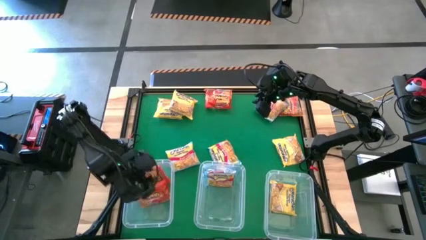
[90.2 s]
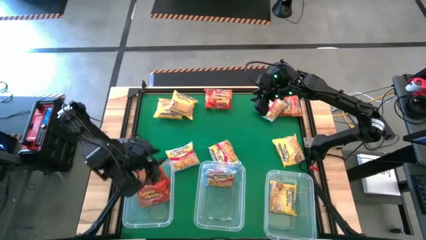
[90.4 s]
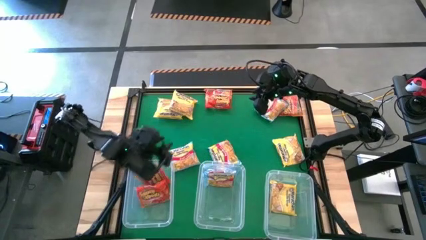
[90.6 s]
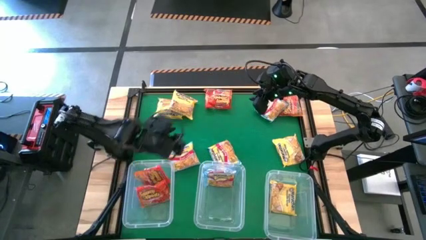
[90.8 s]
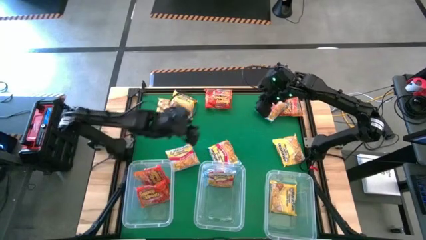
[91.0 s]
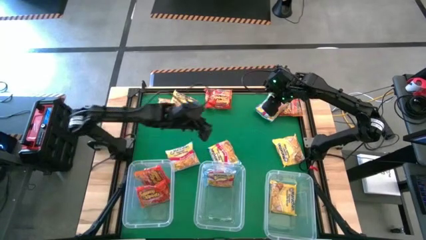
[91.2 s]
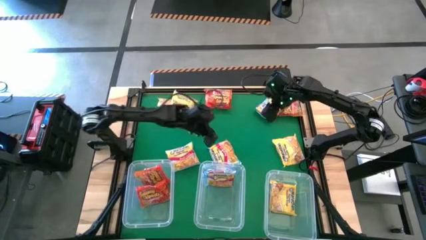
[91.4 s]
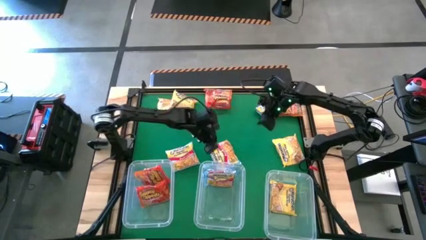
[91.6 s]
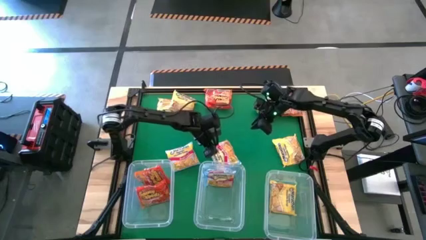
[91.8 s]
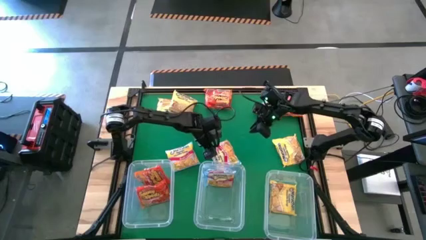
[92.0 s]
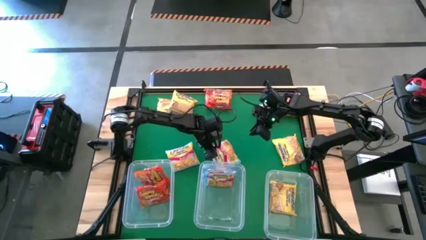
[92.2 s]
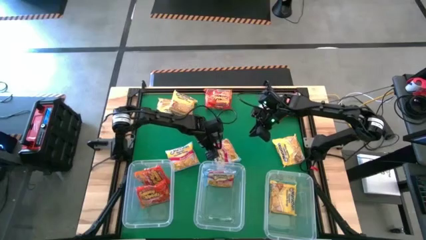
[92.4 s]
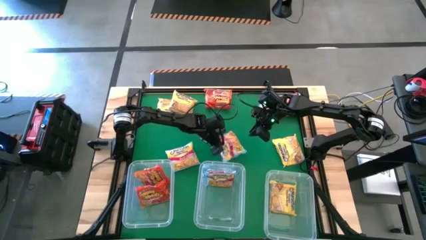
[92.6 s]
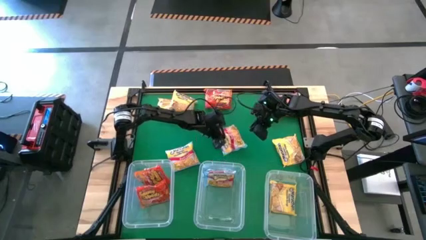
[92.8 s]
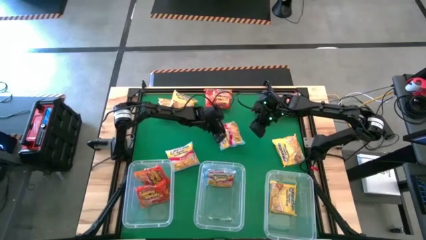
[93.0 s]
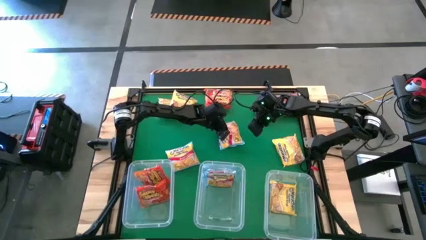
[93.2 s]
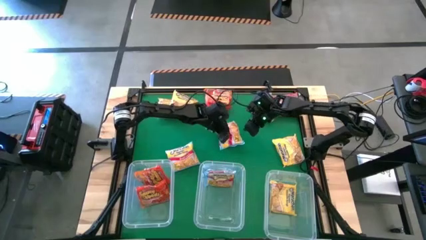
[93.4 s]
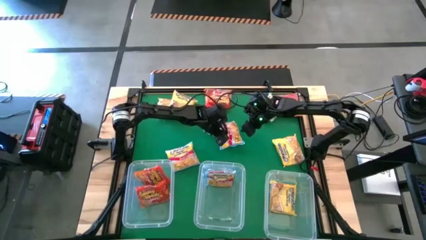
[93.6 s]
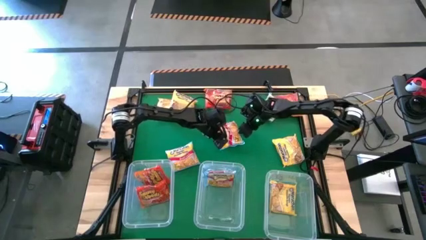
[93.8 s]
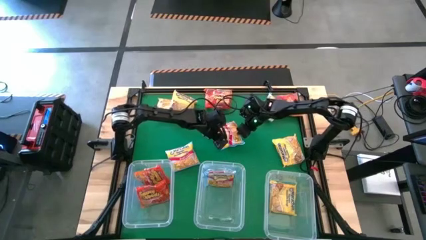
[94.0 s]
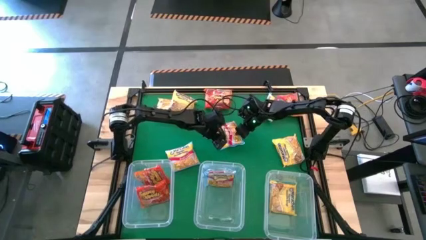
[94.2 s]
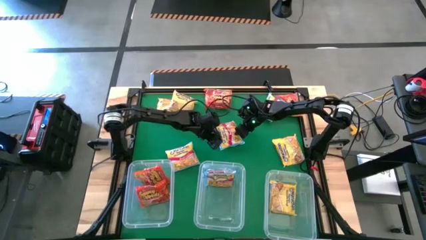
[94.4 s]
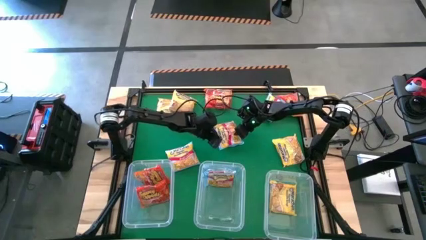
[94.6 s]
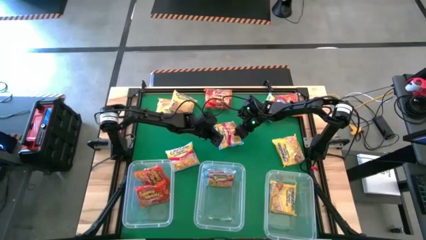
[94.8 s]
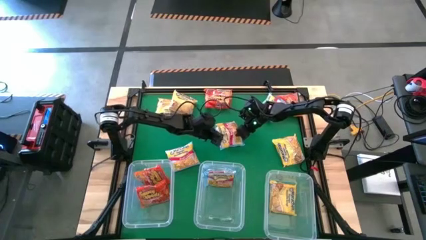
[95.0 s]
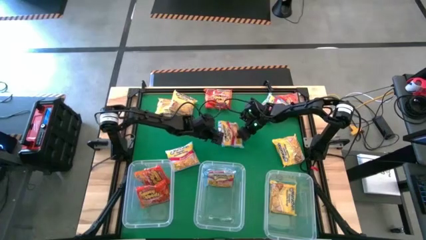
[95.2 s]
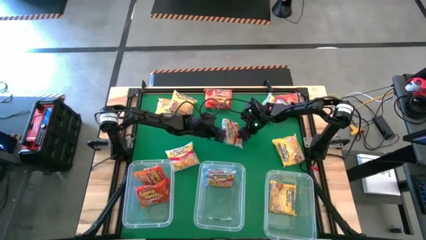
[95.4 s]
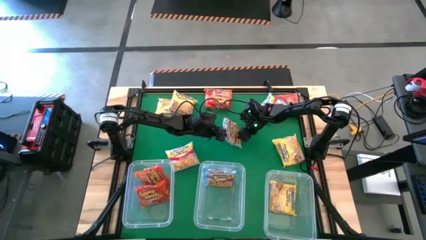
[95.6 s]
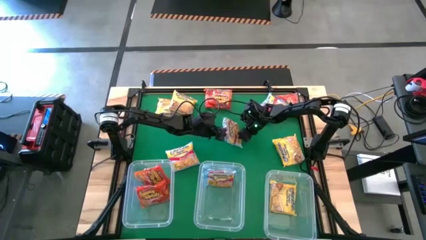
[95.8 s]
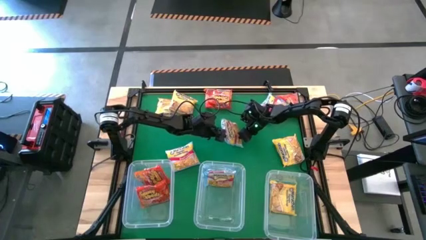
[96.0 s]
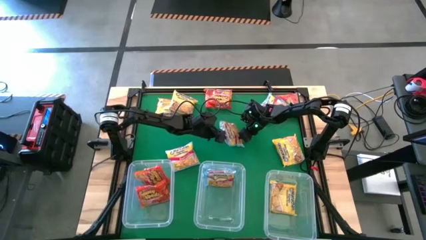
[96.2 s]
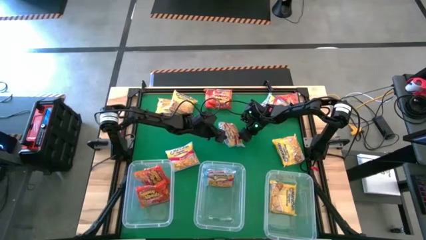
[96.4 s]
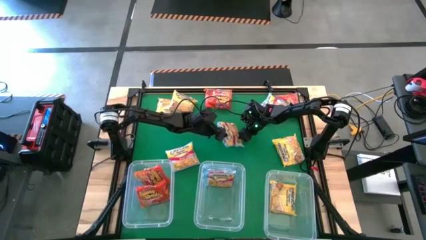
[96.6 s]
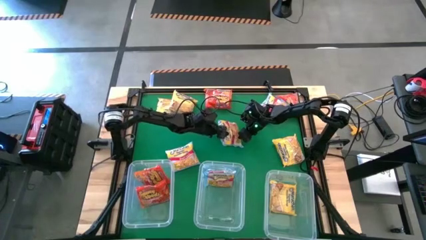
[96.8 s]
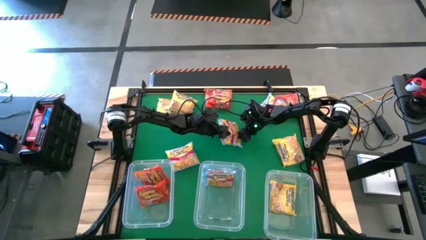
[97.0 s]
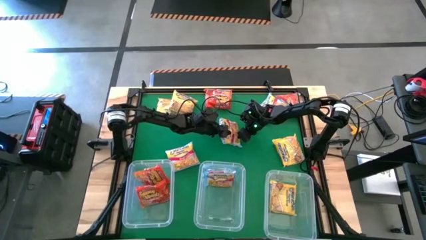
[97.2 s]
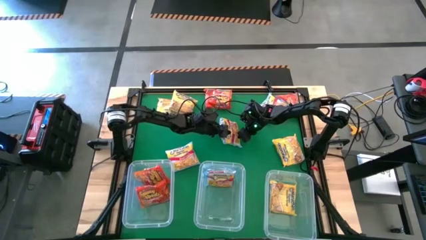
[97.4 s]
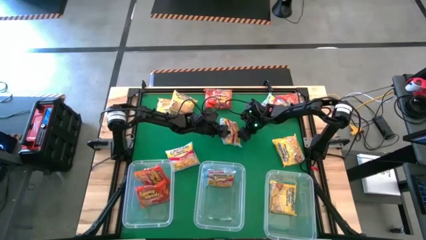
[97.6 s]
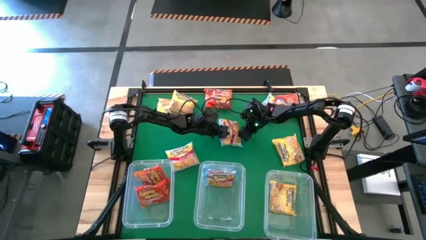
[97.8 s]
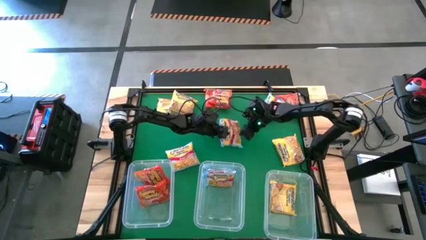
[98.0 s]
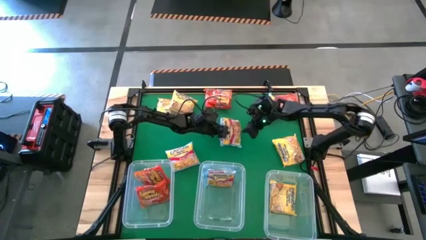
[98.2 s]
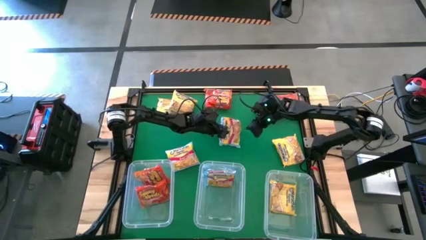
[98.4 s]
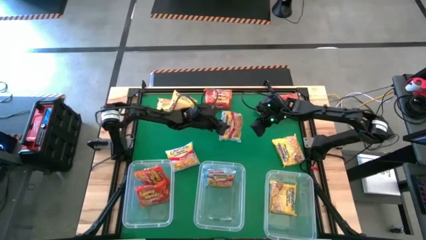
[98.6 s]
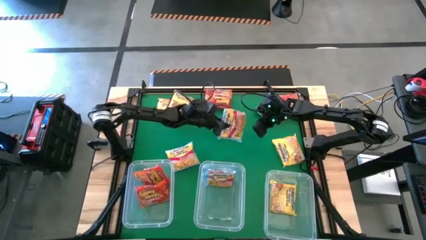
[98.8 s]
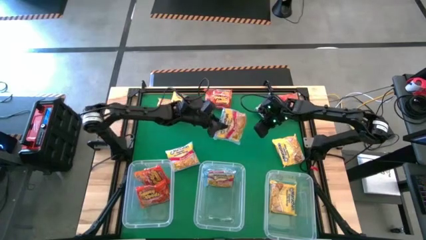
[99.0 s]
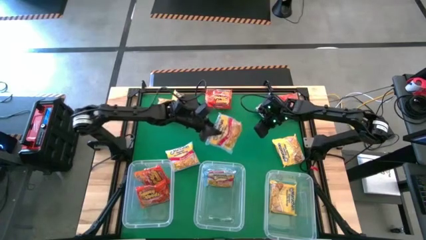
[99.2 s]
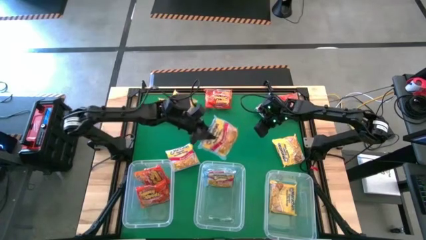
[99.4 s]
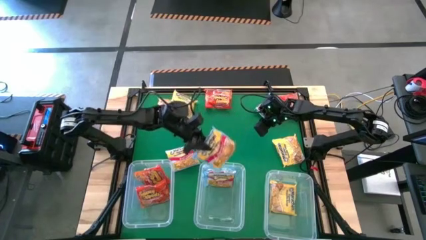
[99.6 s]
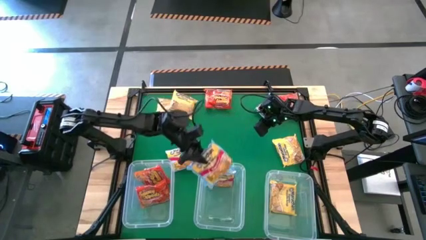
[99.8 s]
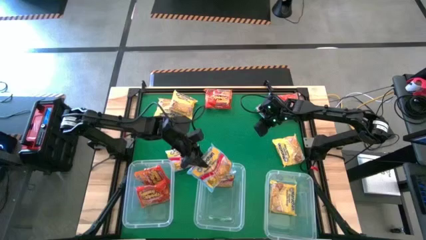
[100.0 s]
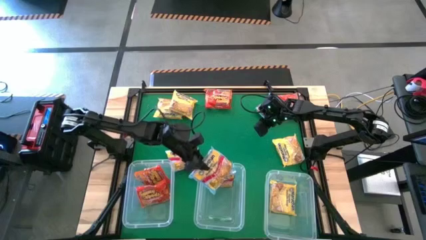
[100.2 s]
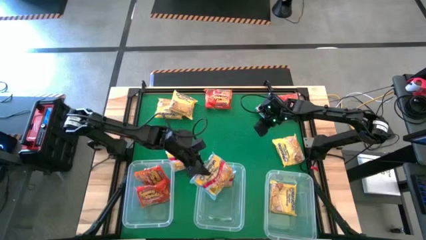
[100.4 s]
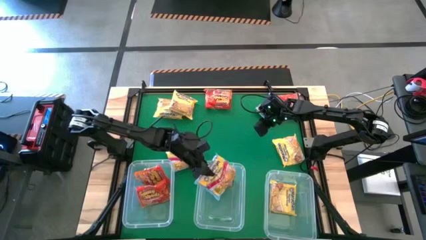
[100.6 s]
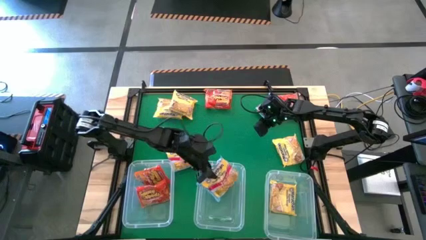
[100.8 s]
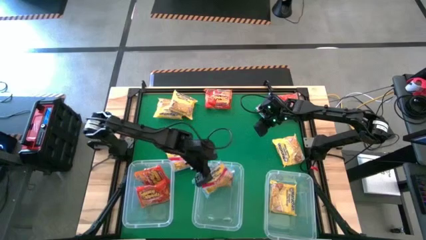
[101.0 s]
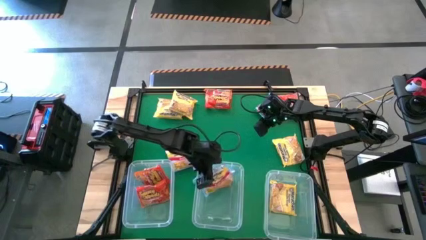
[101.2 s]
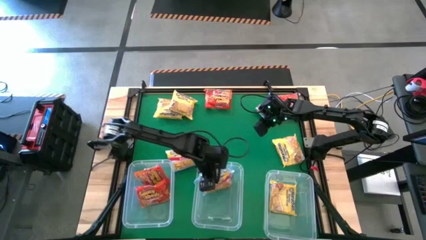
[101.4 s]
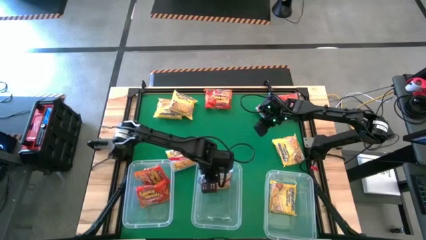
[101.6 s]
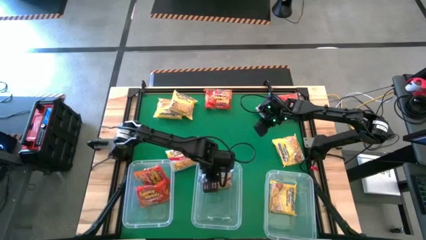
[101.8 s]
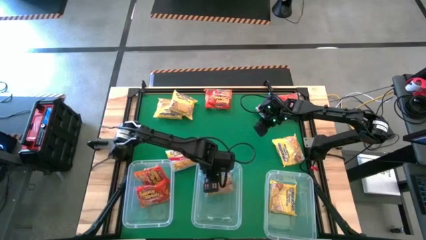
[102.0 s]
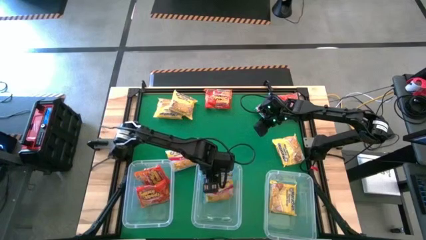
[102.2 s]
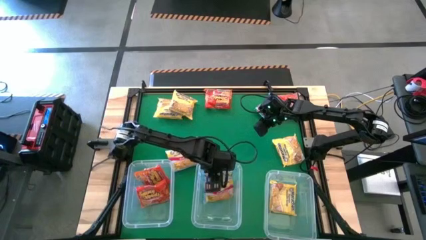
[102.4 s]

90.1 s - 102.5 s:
Task: Sort Maruchan noodles
Put the blue noodle pack into the middle transparent bin

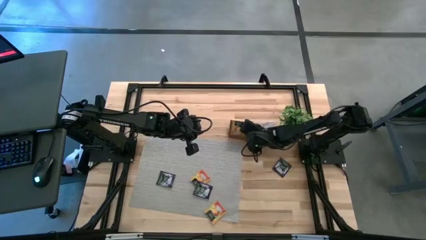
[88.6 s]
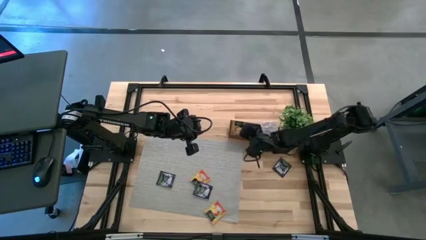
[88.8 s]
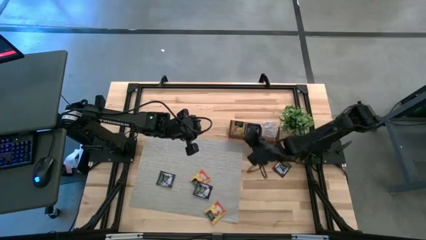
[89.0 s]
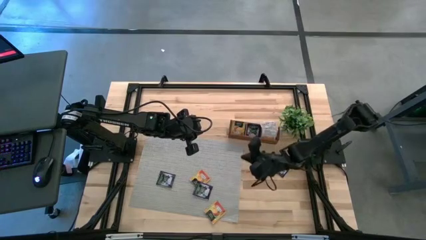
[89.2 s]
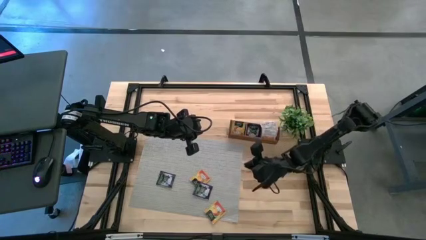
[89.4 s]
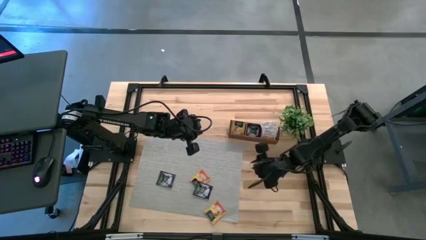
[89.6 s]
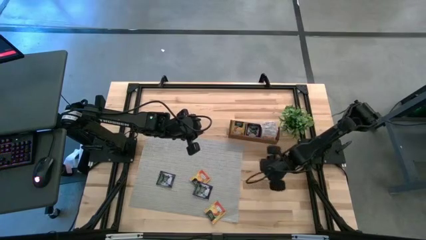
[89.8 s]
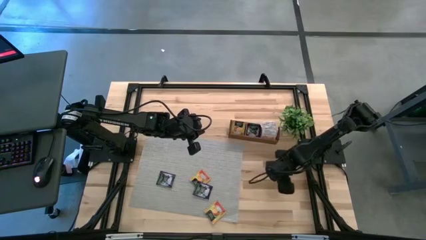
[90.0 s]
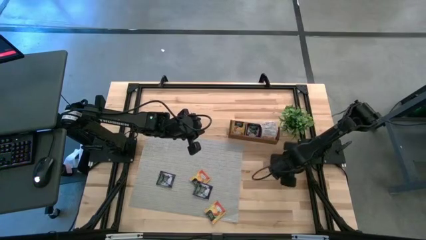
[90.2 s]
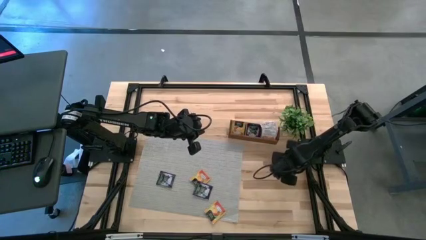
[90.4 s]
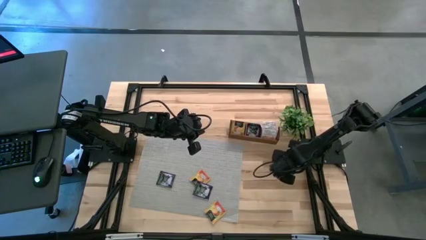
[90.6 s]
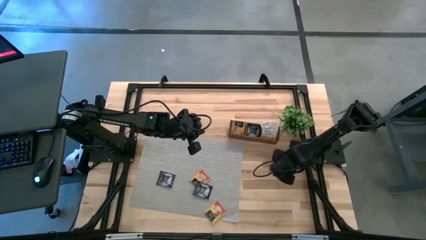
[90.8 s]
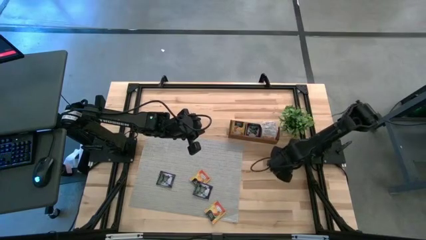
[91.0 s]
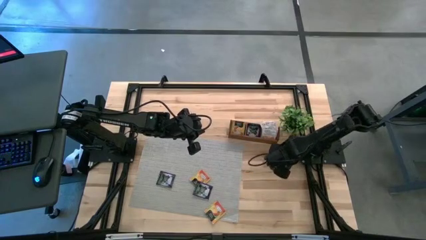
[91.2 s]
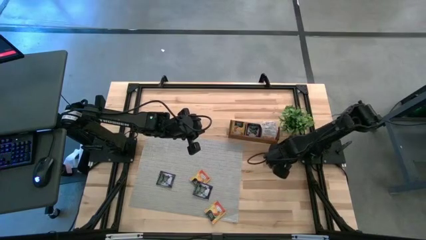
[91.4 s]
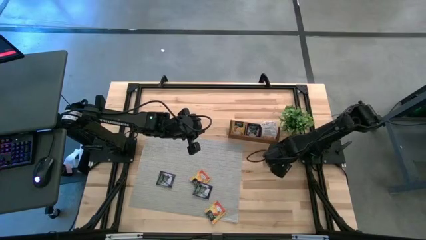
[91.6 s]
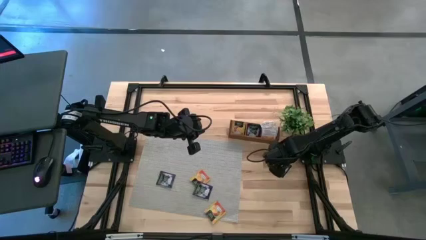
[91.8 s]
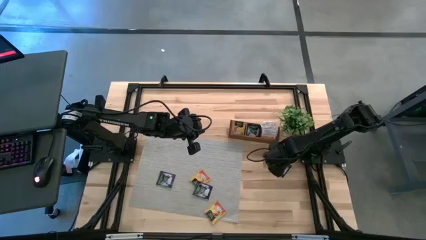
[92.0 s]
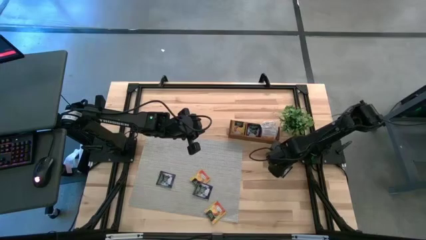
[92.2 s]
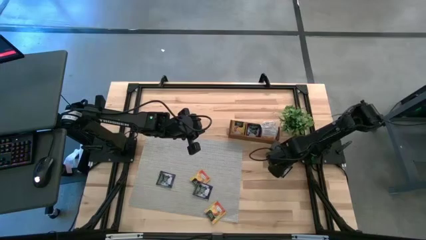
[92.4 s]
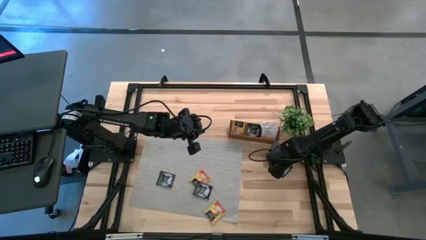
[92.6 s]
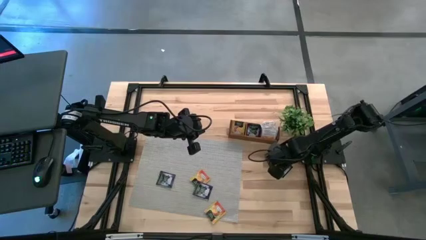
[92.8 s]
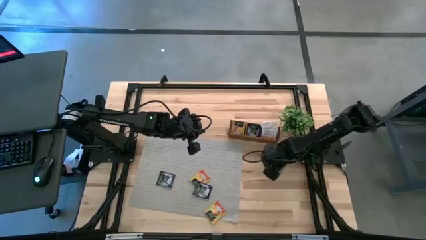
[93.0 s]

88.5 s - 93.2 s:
Task: Pick & Place Tea
Put the dark purple tea bag in the middle section of the wooden organizer

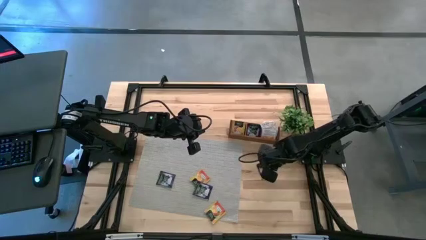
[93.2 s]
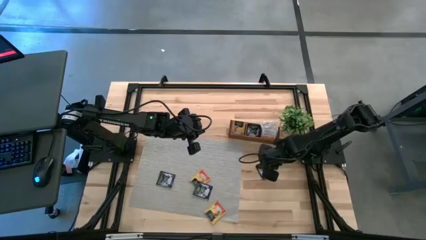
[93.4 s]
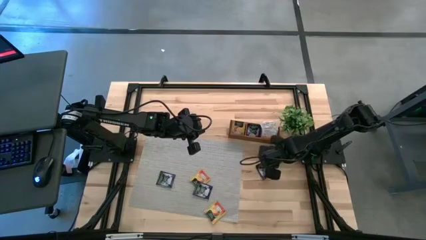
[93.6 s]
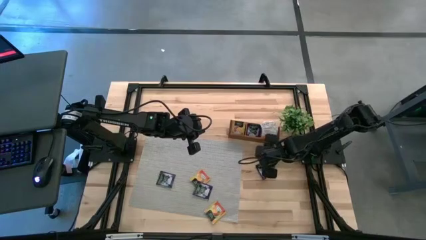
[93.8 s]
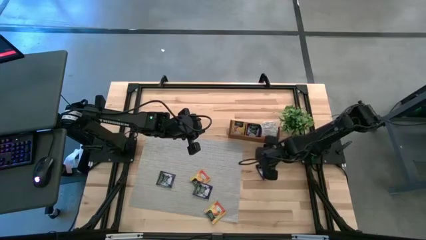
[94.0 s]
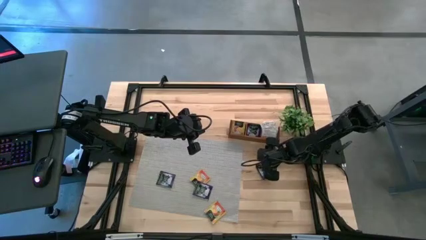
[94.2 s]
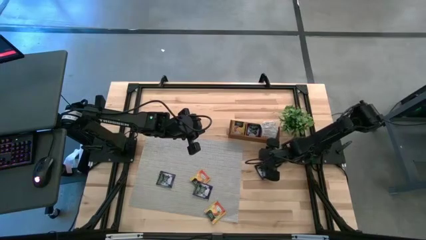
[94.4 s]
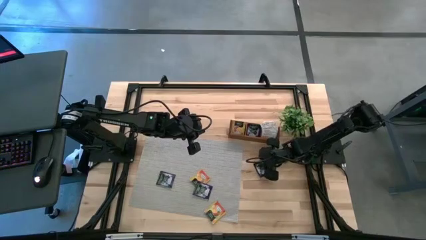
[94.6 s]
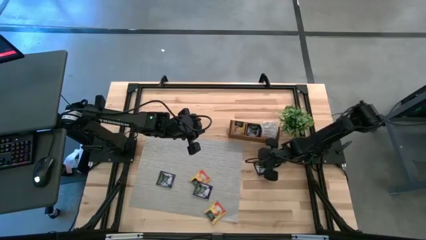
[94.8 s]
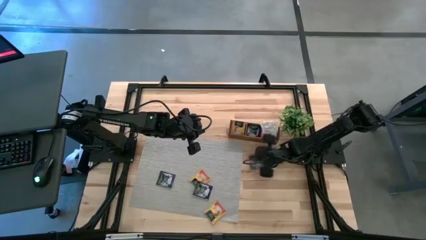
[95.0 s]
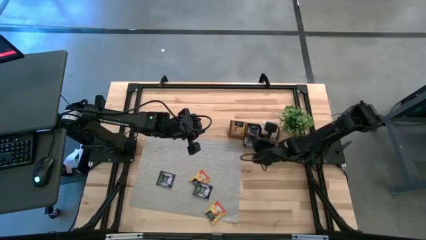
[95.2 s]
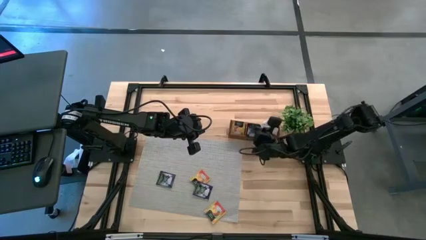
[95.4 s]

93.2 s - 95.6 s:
Put the dark purple tea bag in the middle section of the wooden organizer
